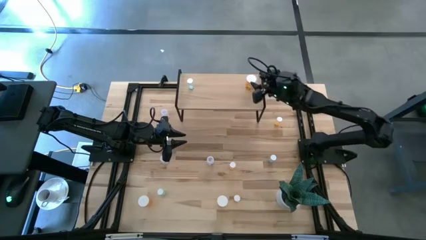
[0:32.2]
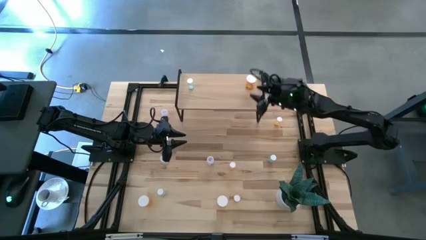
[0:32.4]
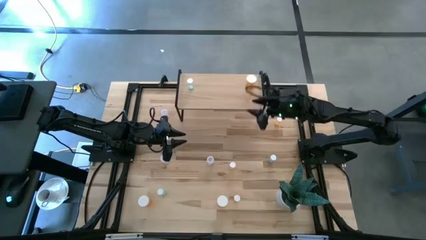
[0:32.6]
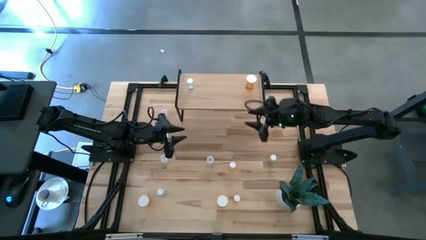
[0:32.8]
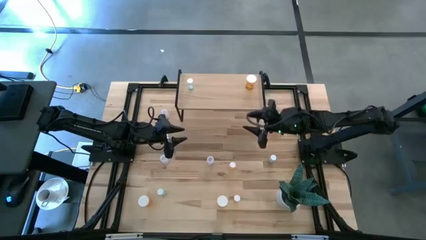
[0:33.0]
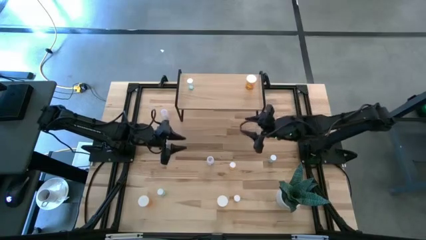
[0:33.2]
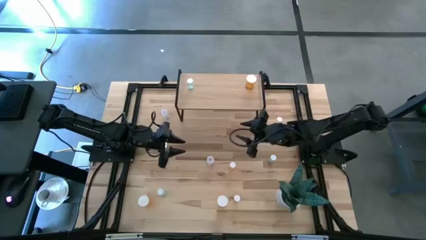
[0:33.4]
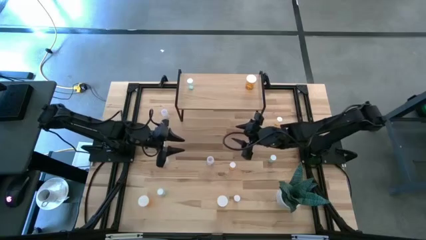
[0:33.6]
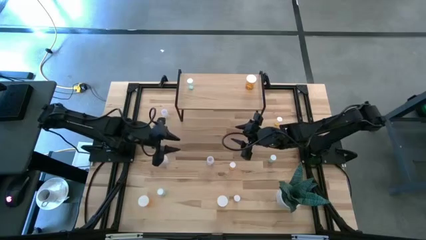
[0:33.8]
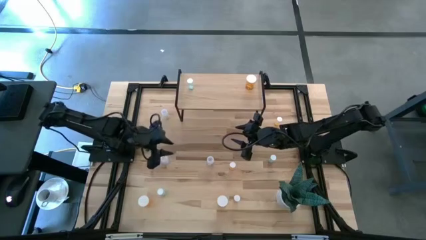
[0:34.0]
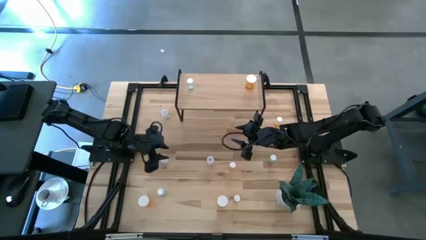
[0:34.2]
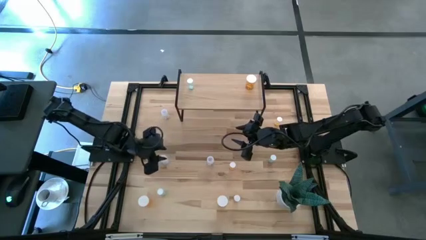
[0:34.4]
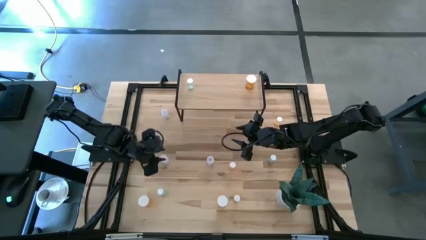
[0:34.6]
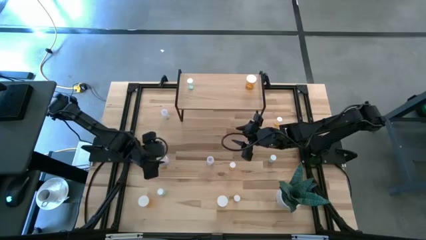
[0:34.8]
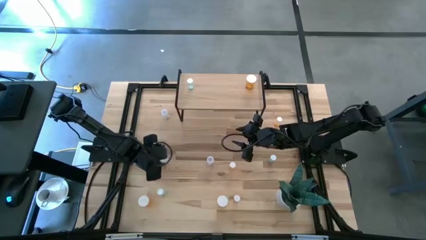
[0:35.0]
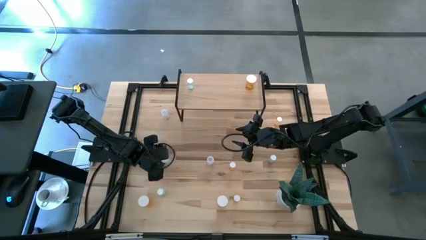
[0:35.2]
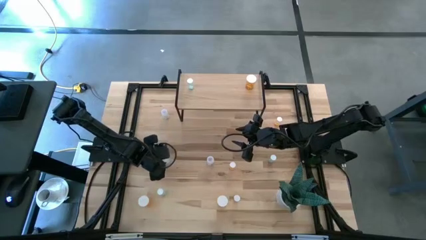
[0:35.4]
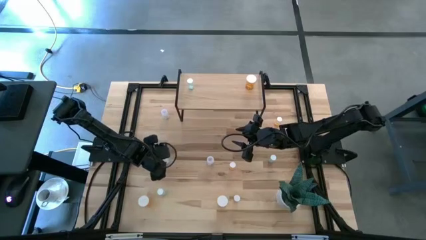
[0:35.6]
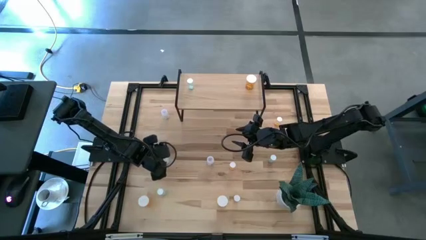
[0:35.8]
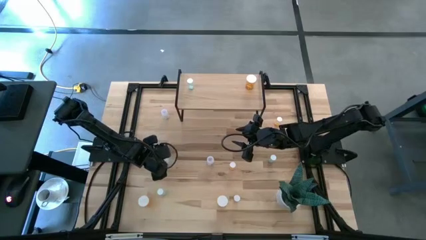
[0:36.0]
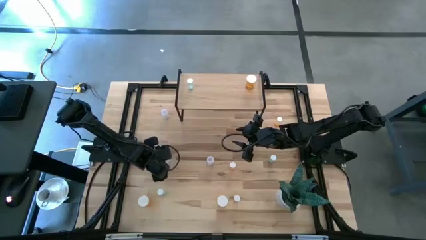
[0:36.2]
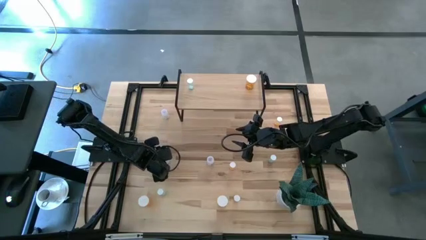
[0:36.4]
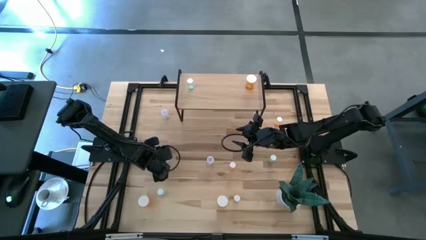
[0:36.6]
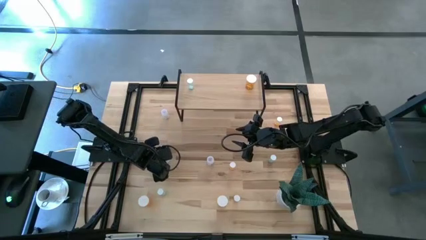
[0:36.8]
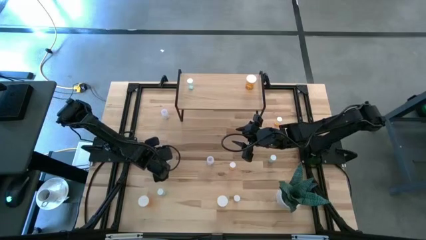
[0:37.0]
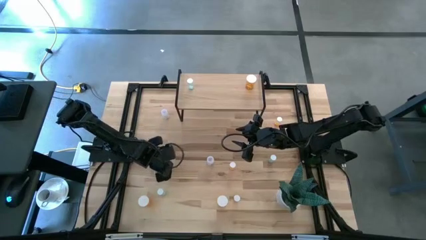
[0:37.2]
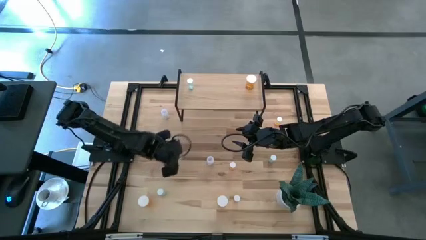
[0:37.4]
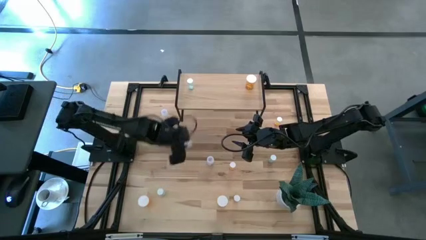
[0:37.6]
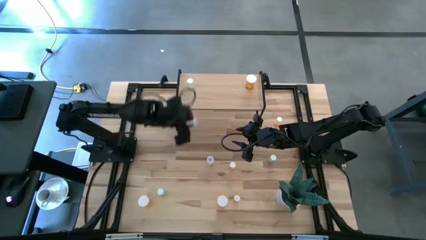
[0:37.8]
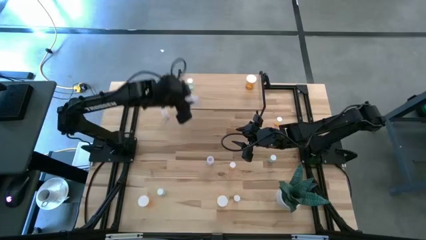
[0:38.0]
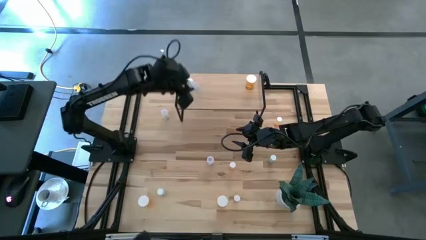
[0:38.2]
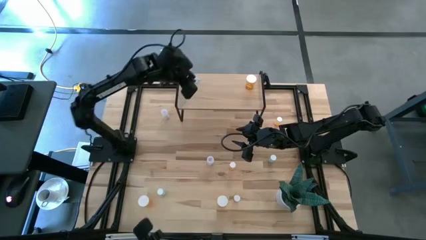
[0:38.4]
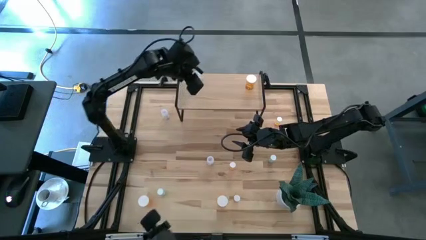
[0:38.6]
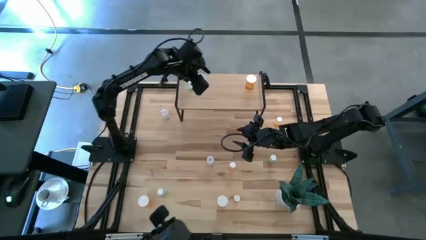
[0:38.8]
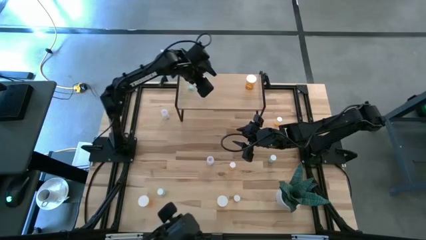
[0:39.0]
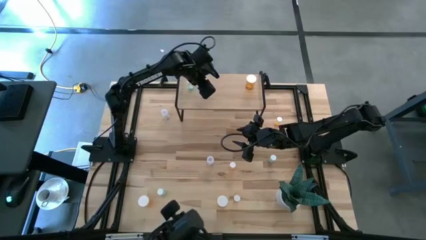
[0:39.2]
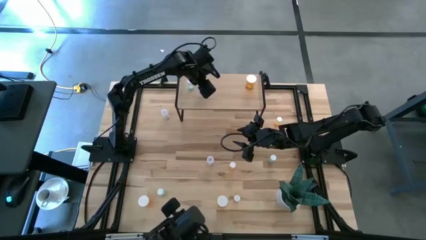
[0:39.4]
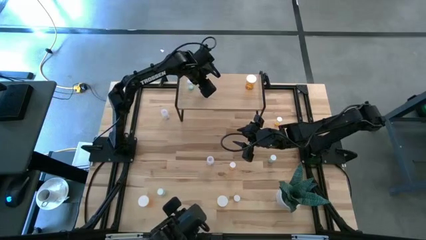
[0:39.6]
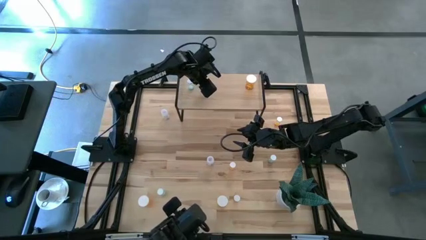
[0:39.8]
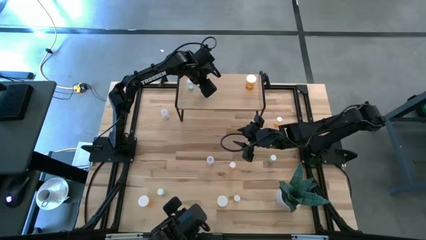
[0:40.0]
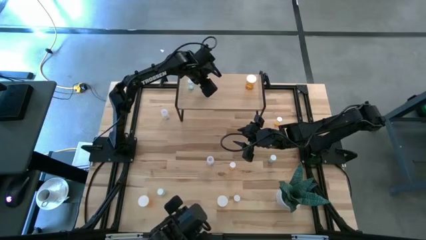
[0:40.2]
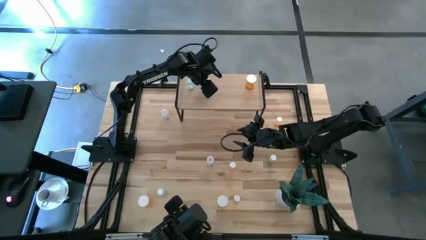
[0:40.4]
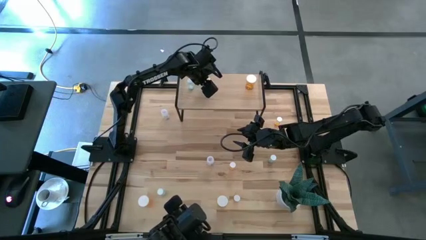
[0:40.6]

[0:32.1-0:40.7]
Task: Pick and place medicine bottles onto shelf by color
Put the bottom left transparent pill bottle on the shelf

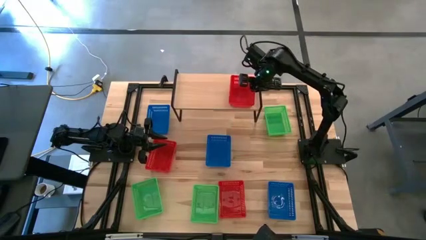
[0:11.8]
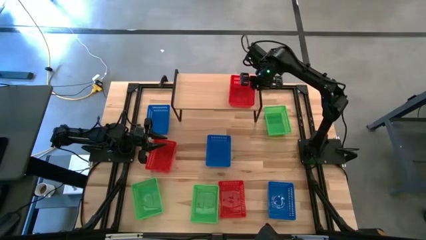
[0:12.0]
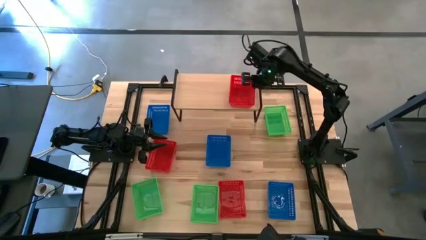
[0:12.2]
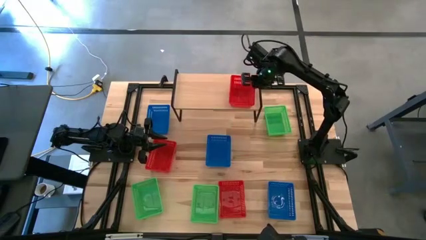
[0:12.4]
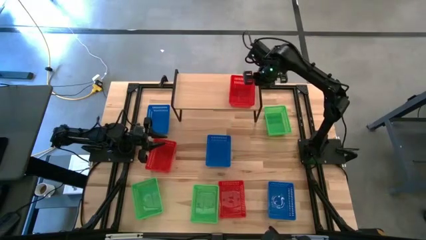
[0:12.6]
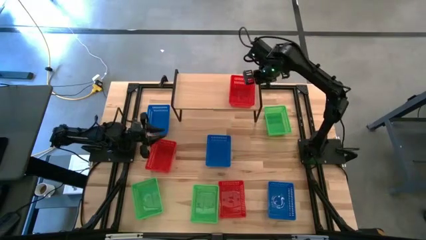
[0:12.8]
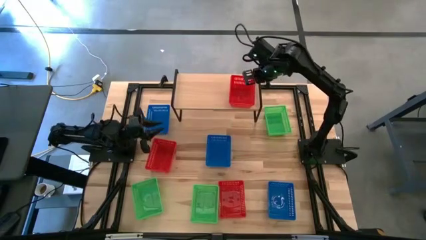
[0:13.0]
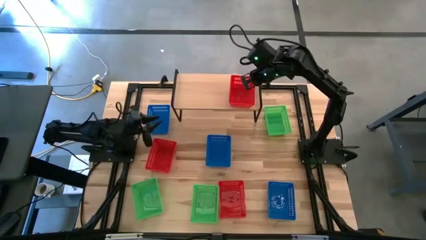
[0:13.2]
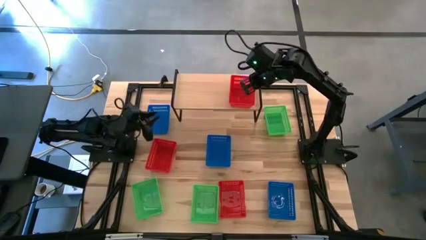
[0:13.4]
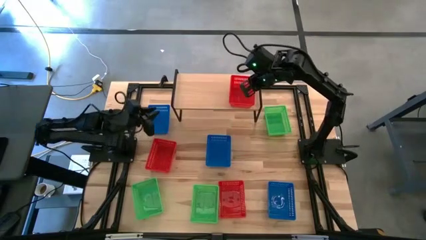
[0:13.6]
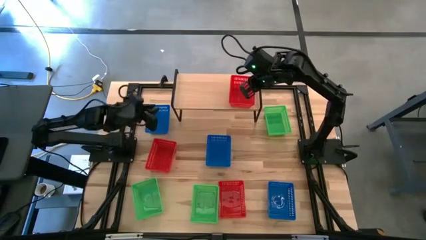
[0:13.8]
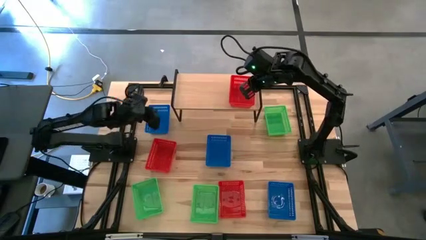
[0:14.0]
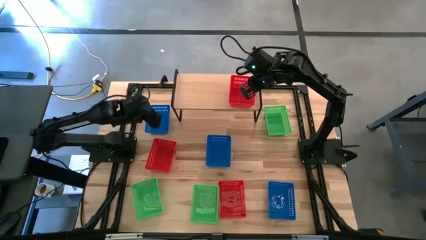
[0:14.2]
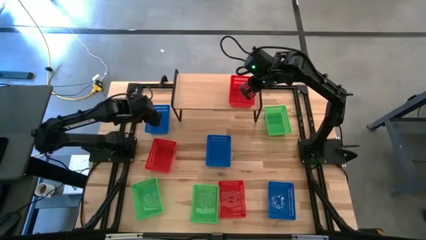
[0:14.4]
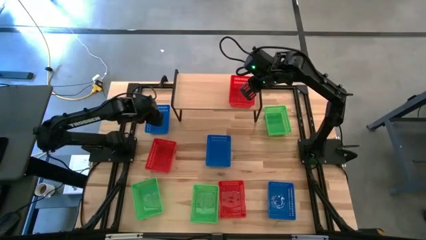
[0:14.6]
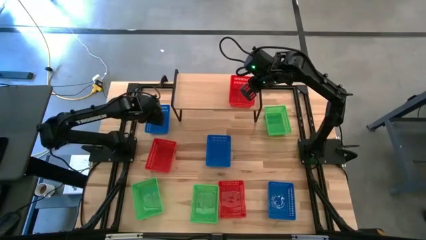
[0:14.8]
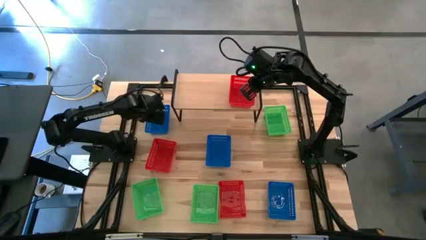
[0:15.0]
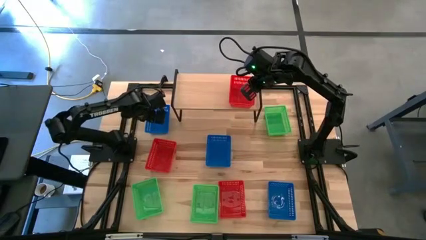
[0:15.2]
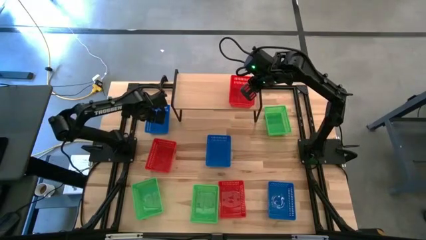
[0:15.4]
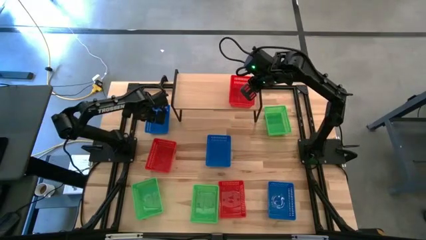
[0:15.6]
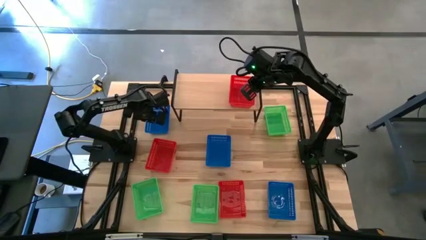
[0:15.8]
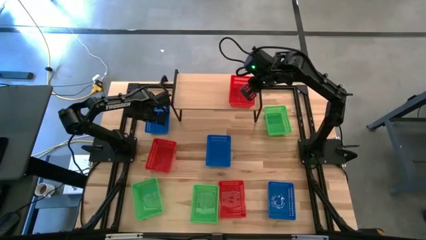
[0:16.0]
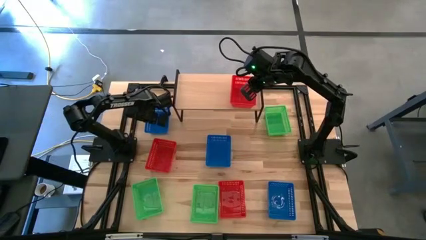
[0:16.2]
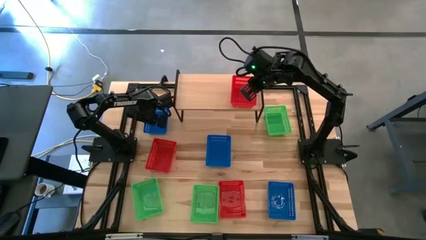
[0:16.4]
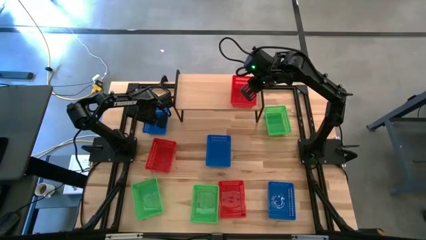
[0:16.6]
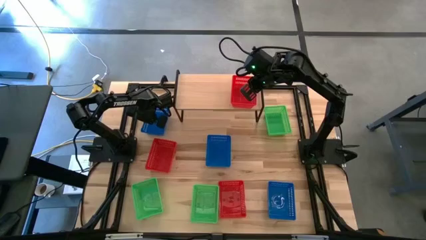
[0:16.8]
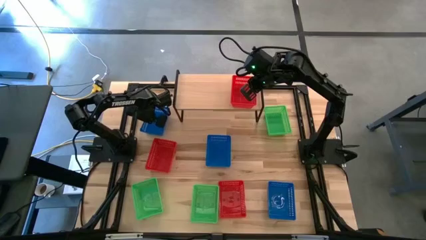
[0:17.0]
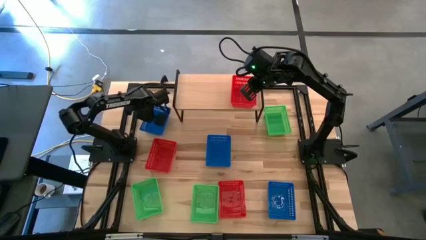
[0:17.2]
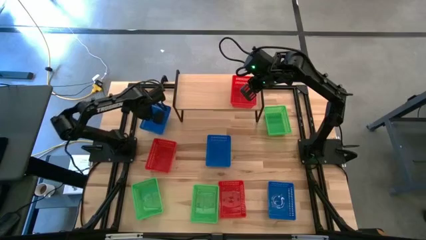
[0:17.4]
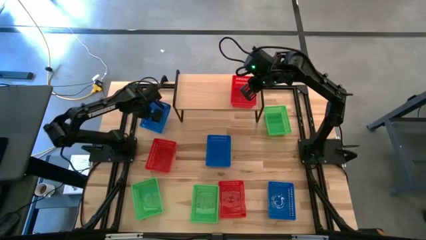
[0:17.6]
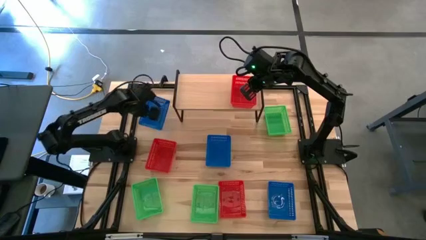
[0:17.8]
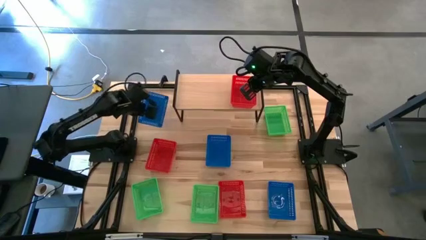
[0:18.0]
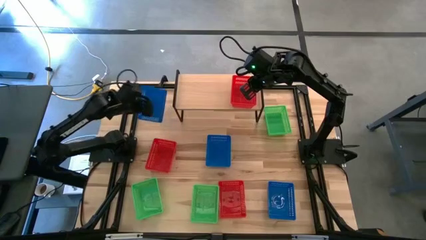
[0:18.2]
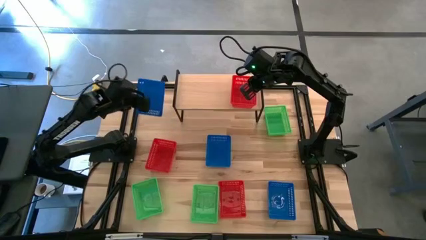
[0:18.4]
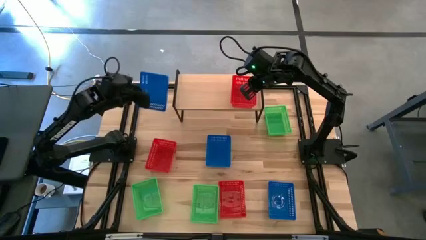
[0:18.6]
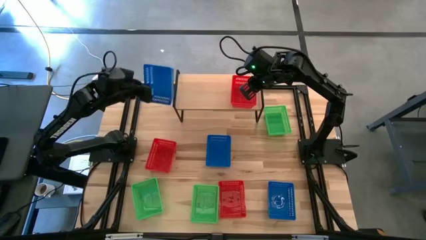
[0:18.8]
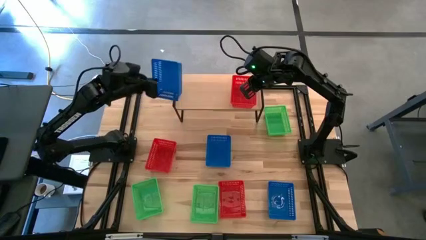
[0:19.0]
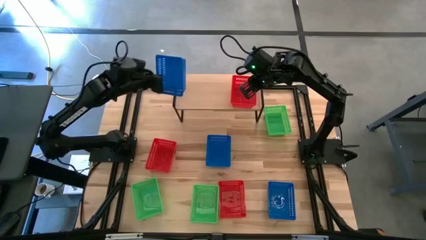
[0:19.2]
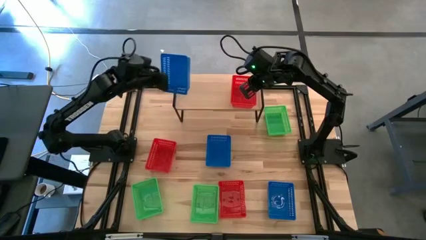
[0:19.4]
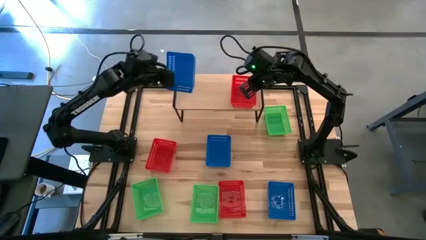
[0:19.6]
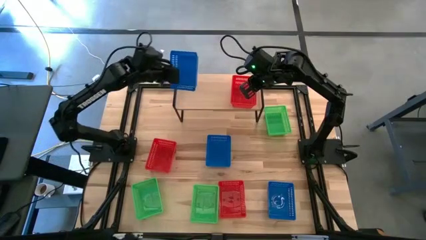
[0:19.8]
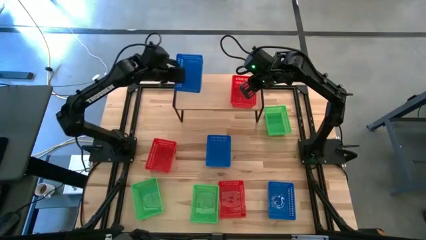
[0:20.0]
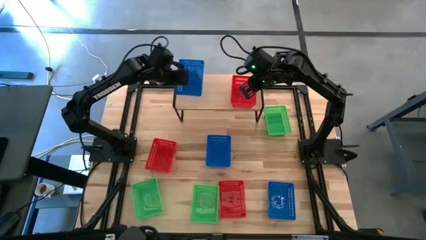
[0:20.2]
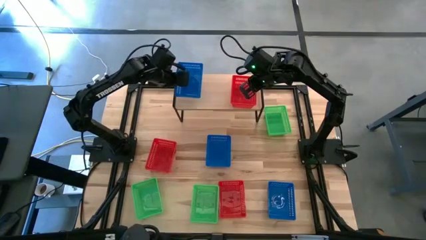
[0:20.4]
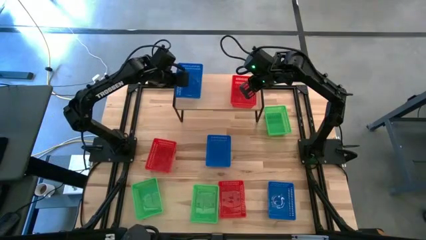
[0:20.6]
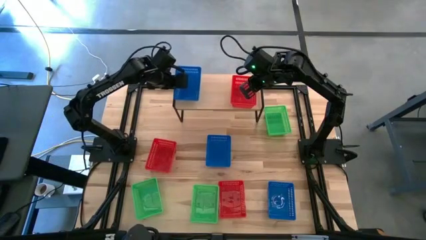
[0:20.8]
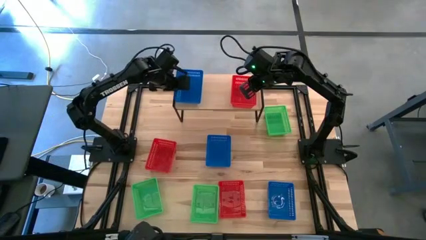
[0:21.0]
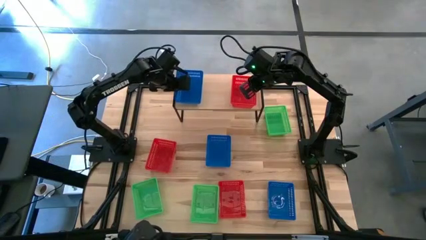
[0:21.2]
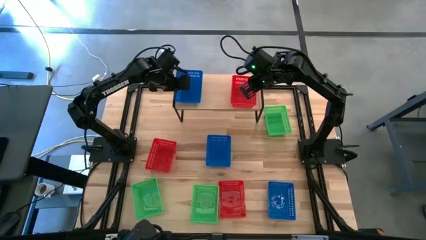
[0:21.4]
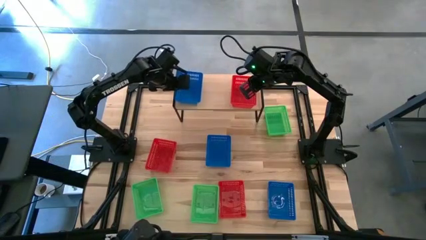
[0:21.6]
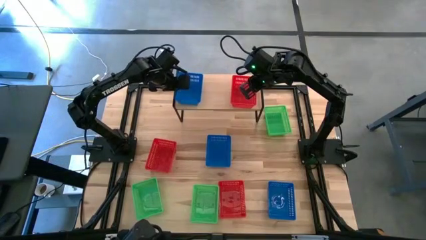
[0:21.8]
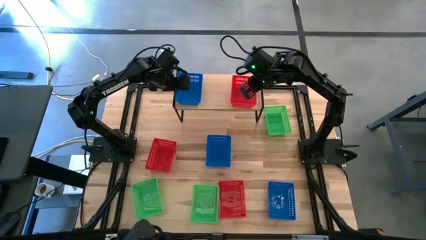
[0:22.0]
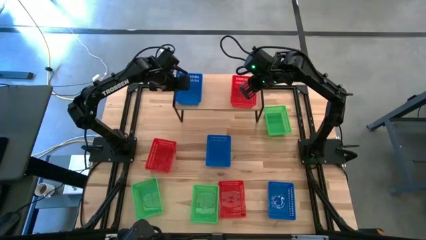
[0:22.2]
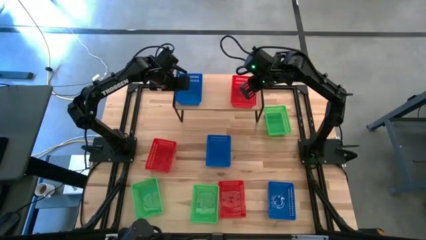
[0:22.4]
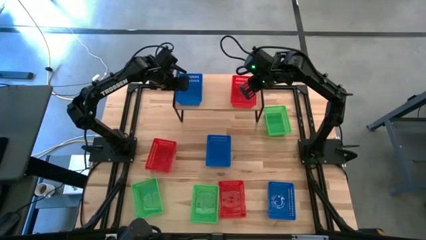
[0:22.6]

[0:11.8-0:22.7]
Task: Stack baskets on shelf by color
Put the top left blue bin on the shelf
